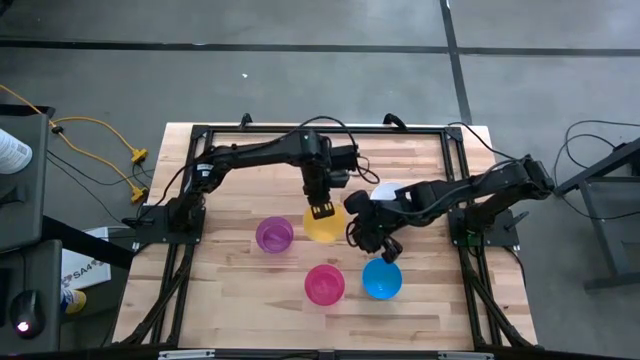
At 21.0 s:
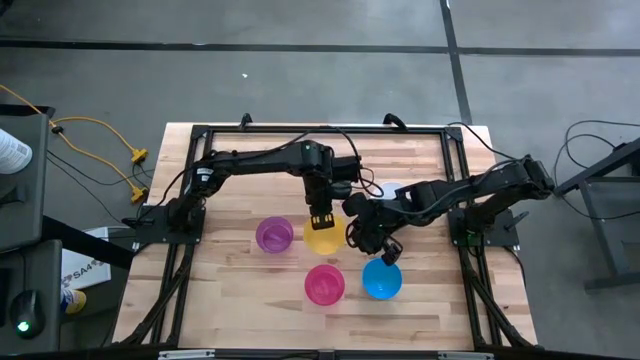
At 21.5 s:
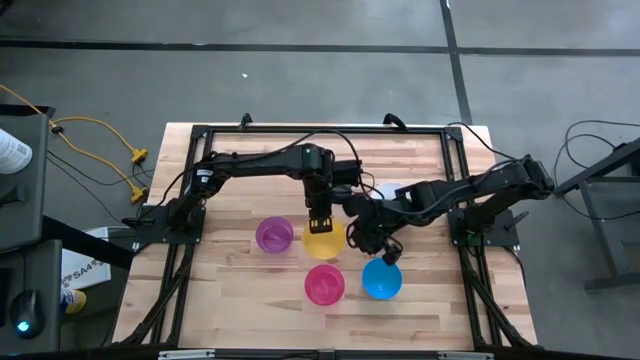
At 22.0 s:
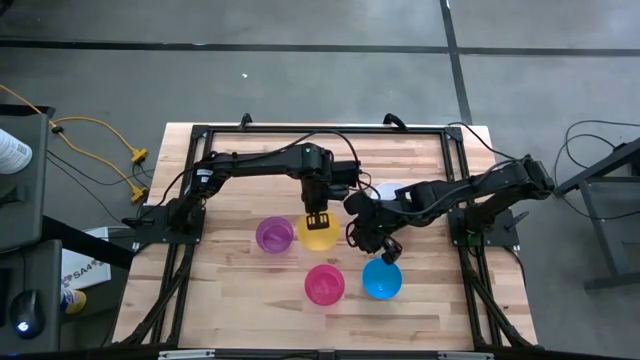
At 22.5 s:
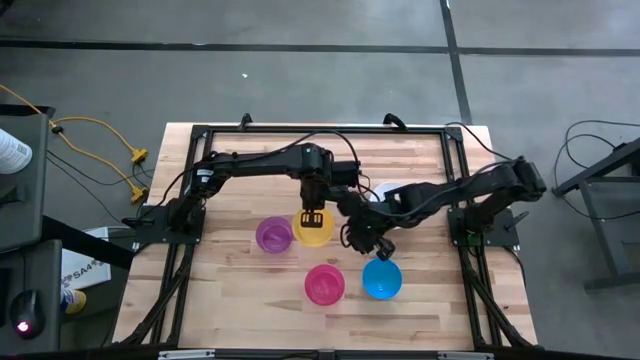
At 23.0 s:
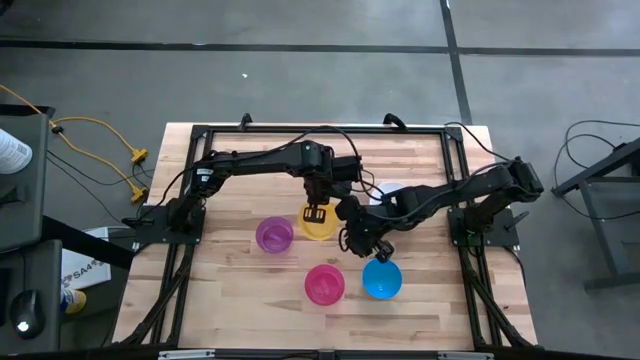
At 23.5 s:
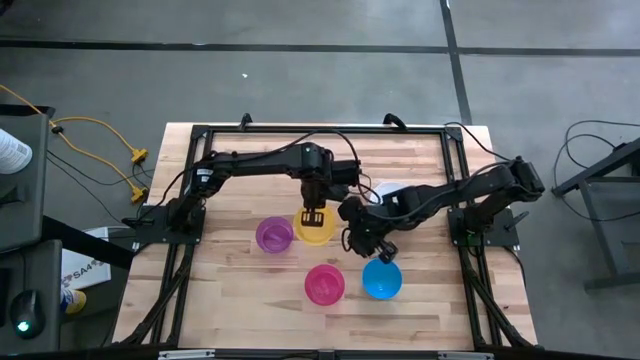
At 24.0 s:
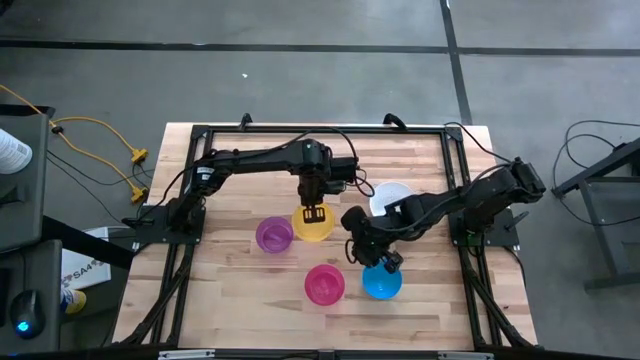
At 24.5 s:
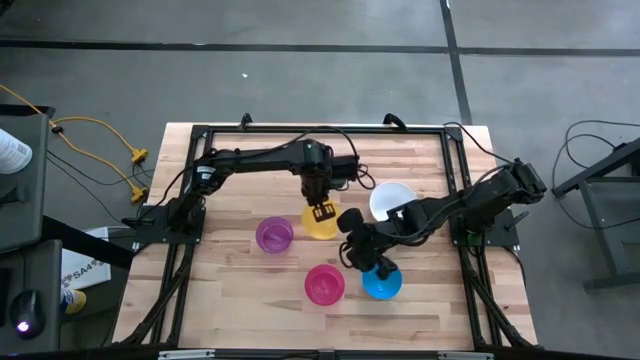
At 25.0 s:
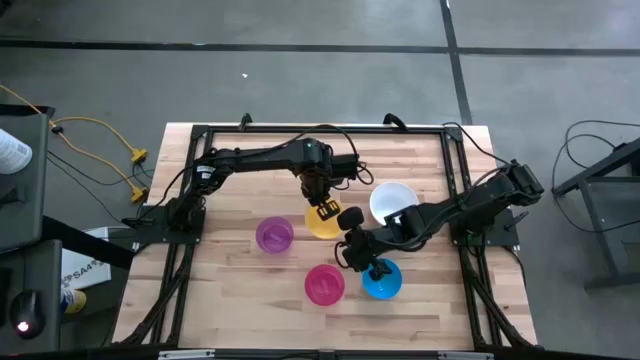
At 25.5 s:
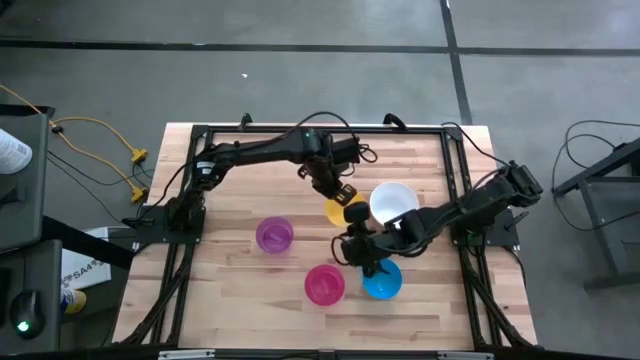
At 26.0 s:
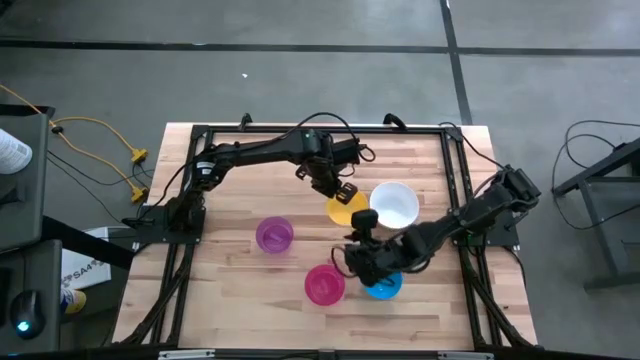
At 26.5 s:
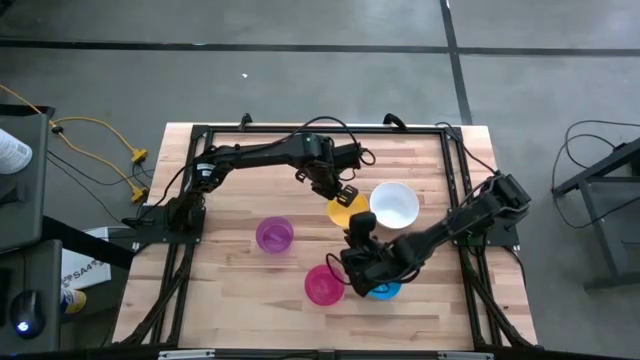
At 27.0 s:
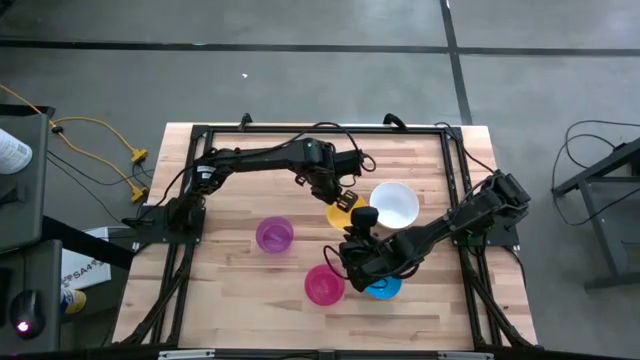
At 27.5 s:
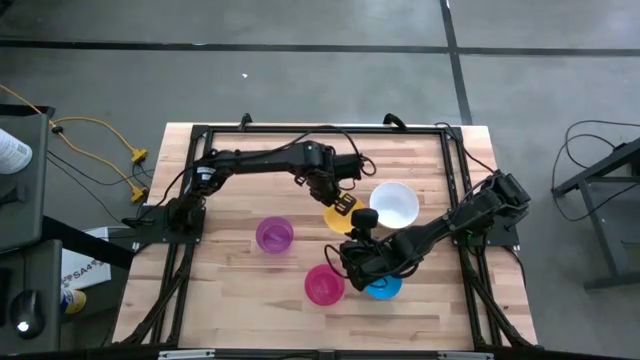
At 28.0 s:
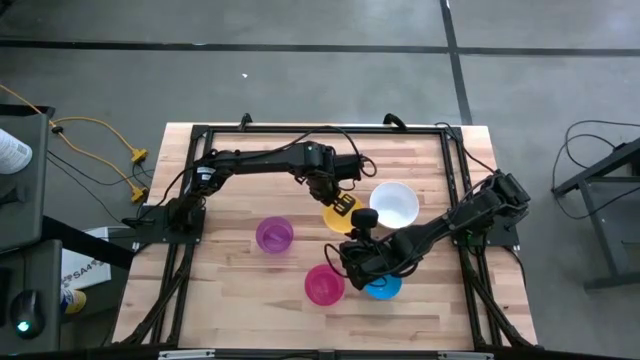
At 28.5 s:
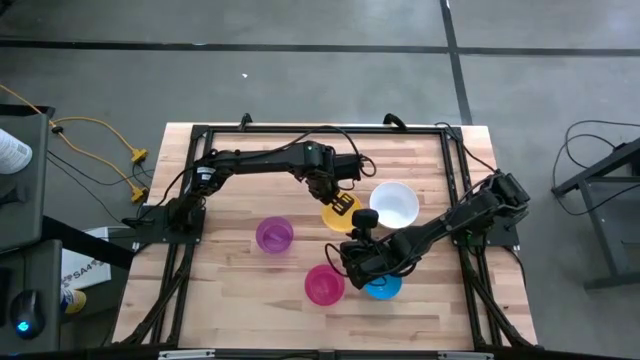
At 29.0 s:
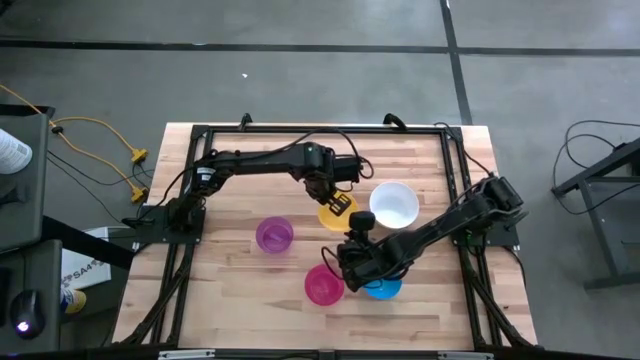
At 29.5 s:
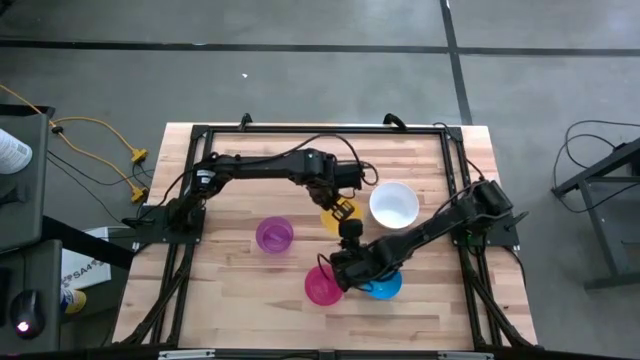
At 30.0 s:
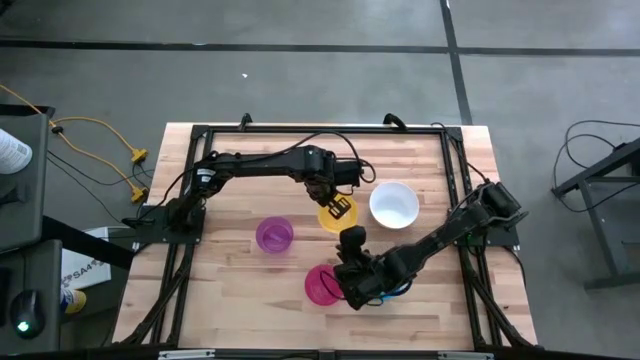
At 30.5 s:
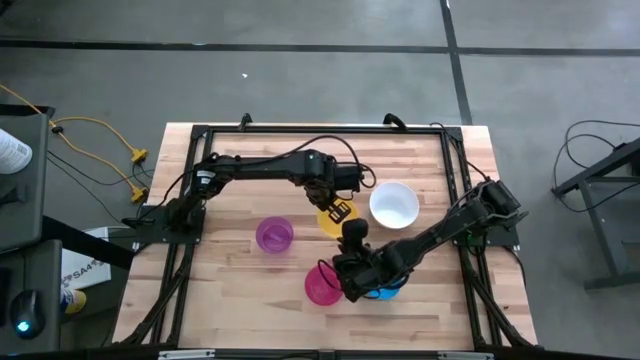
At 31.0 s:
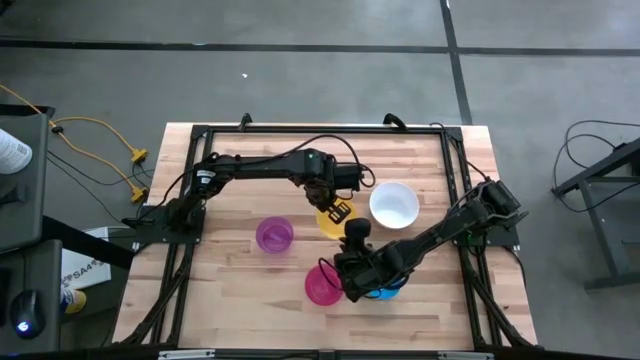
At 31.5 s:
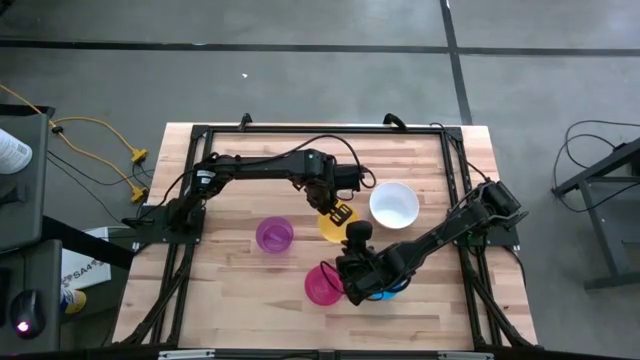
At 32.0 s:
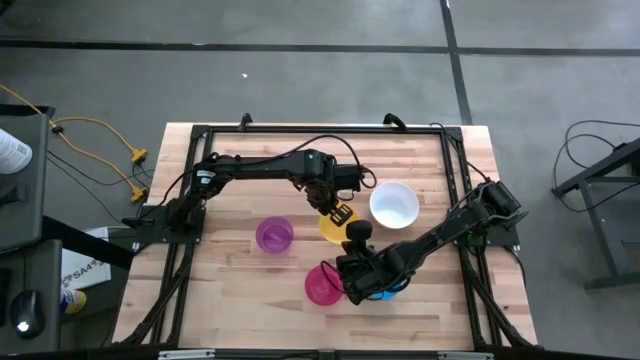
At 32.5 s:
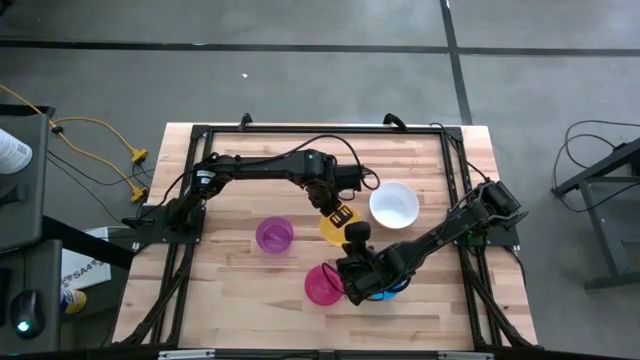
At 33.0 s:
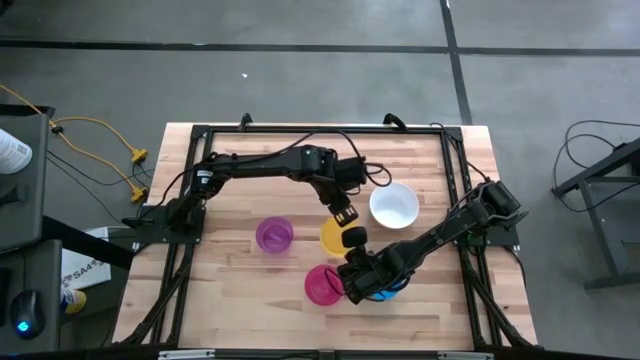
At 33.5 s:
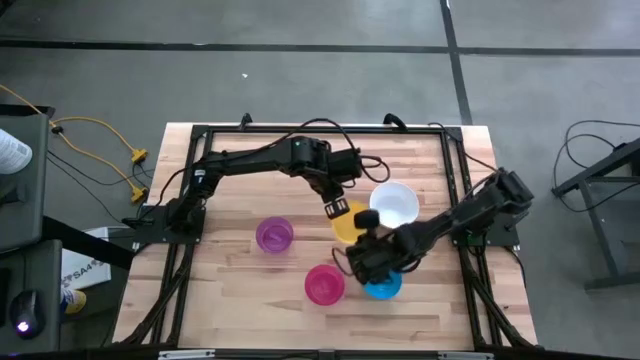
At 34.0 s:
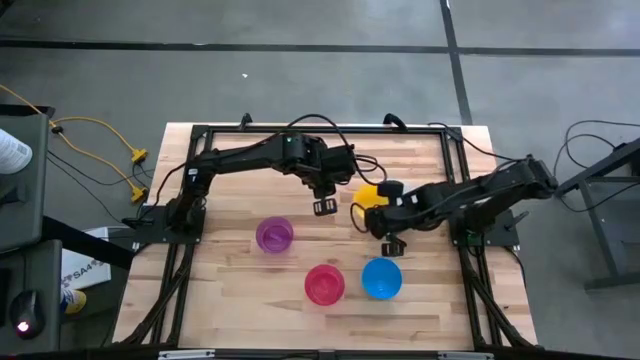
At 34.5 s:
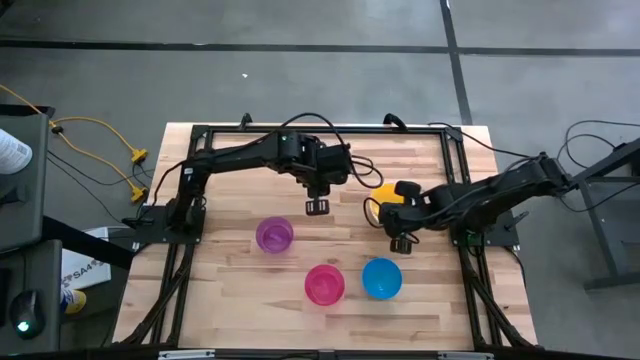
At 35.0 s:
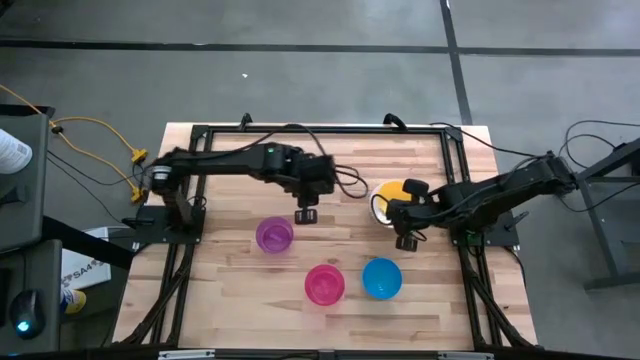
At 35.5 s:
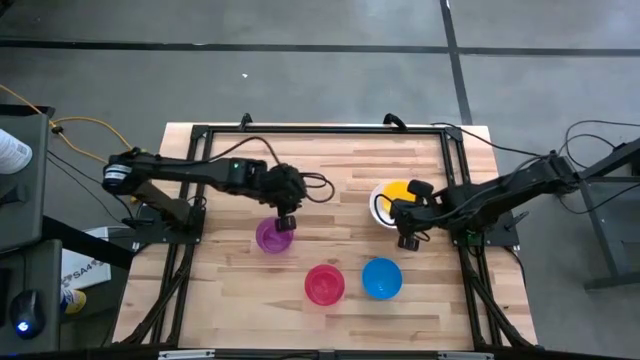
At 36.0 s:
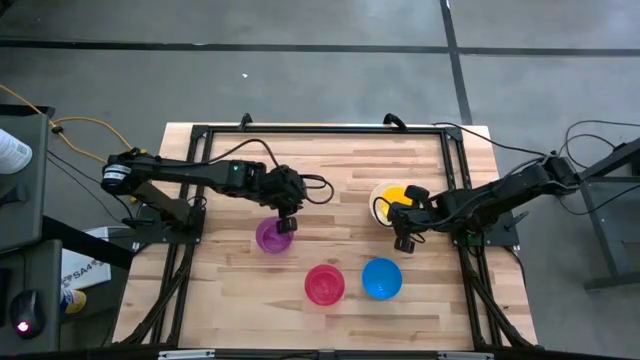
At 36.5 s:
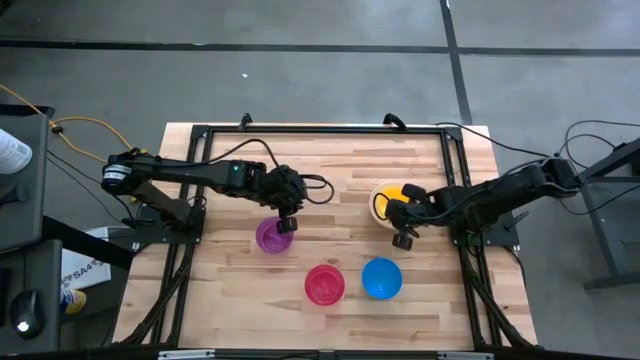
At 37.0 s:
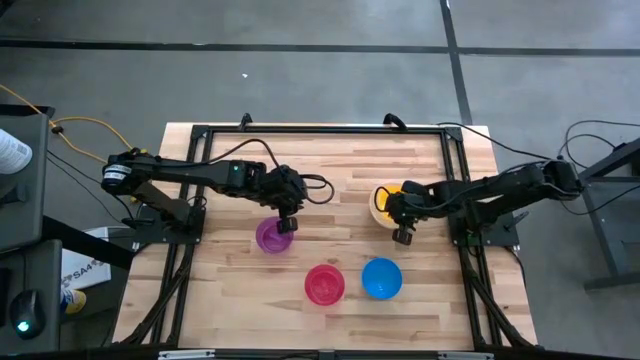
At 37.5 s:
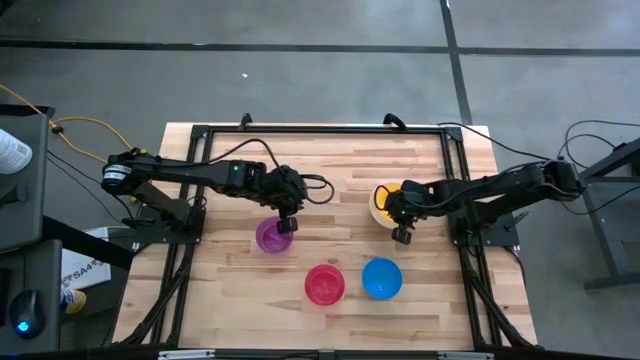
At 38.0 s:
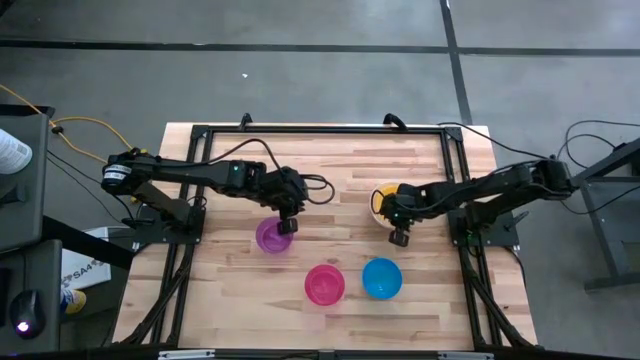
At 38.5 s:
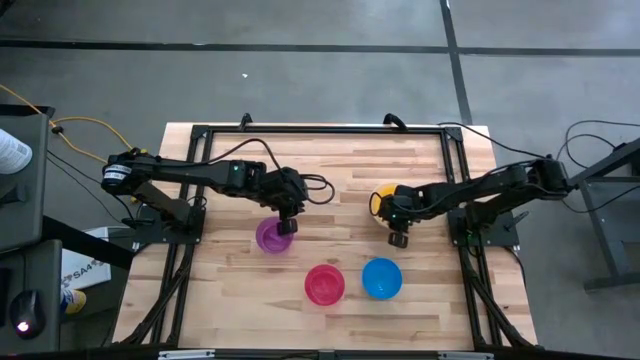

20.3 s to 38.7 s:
Stack the yellow bowl on top of the white bowl
